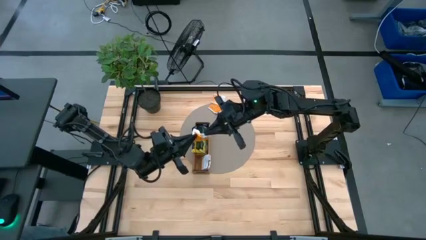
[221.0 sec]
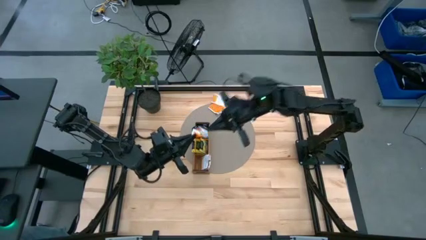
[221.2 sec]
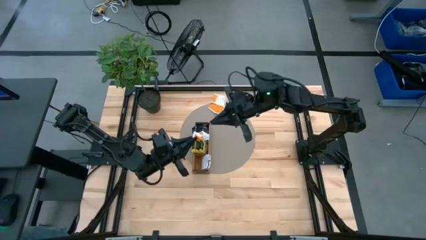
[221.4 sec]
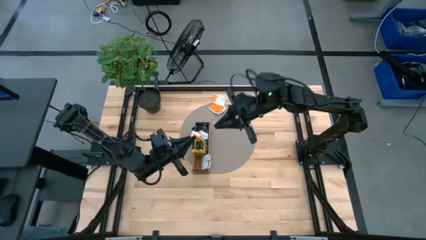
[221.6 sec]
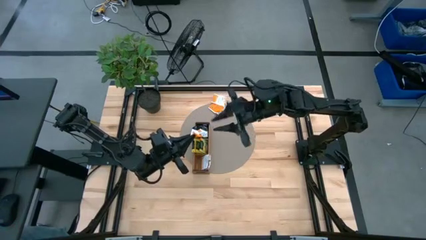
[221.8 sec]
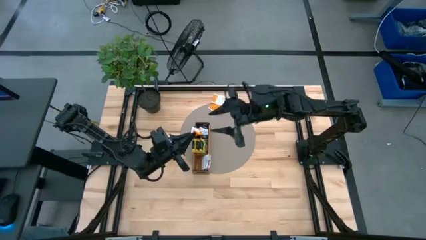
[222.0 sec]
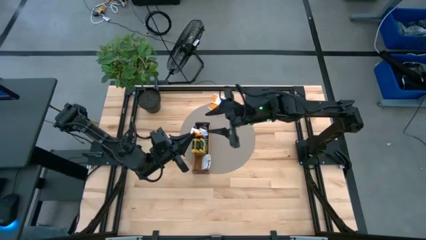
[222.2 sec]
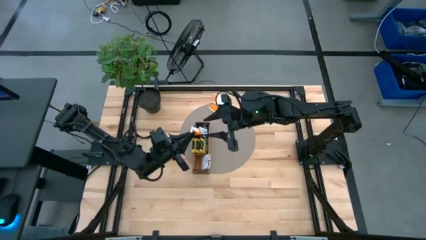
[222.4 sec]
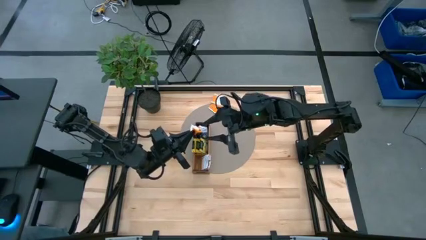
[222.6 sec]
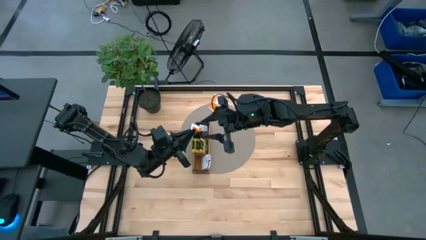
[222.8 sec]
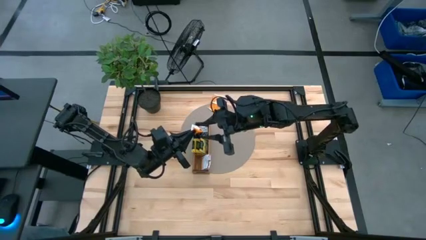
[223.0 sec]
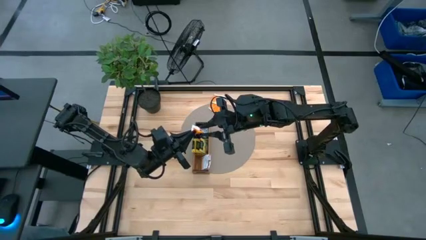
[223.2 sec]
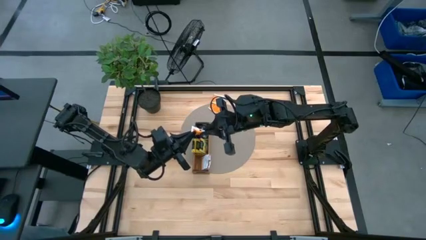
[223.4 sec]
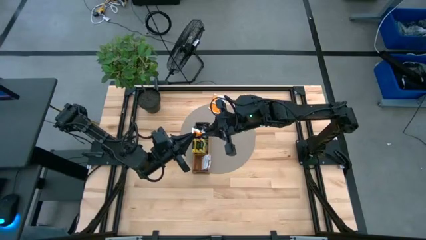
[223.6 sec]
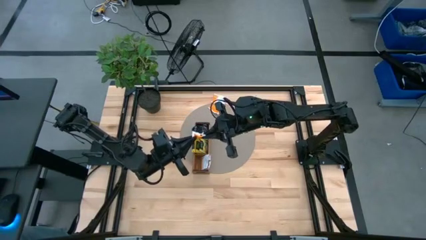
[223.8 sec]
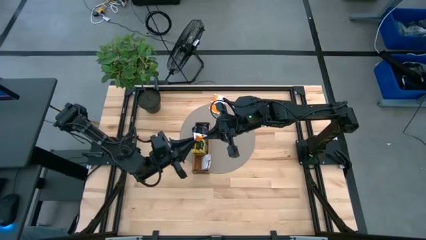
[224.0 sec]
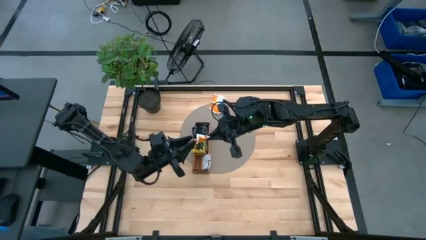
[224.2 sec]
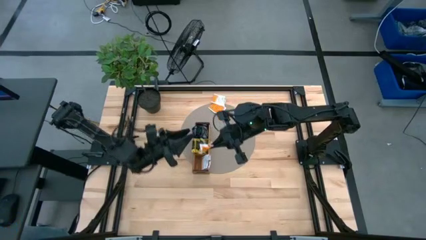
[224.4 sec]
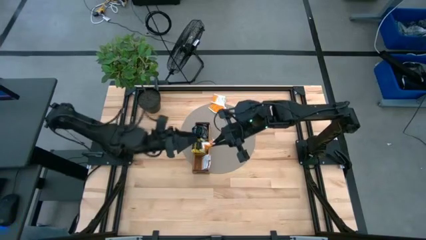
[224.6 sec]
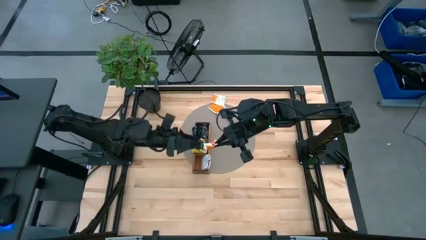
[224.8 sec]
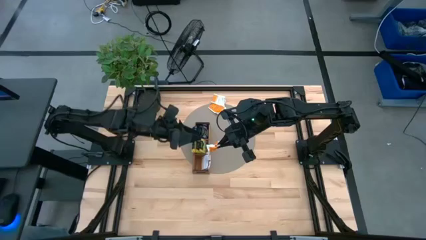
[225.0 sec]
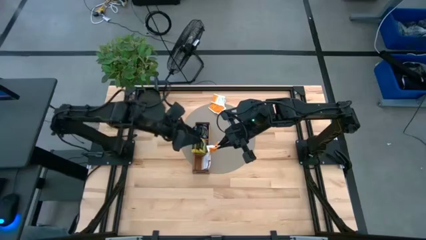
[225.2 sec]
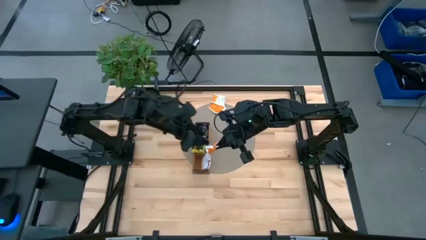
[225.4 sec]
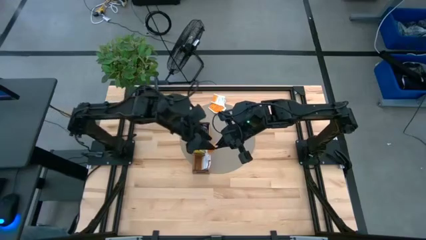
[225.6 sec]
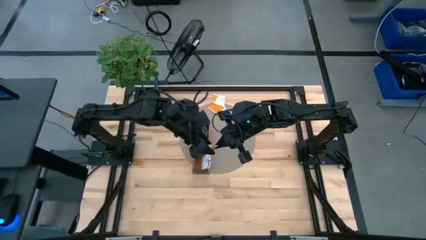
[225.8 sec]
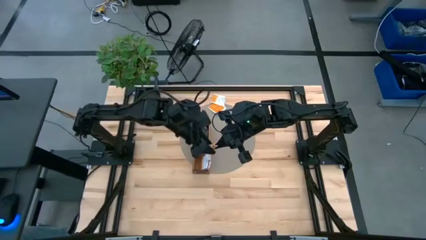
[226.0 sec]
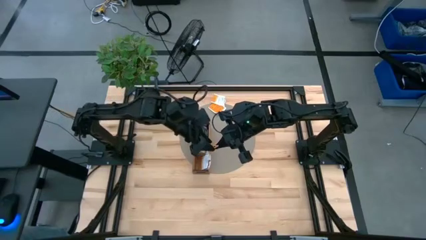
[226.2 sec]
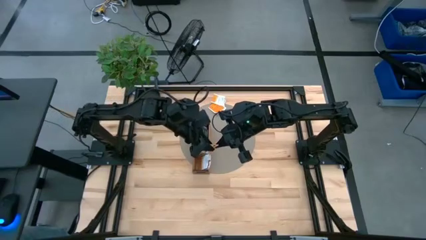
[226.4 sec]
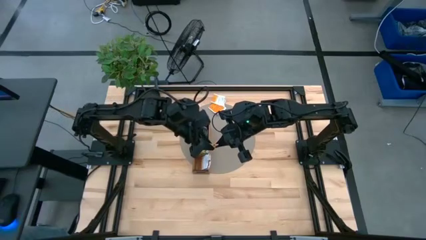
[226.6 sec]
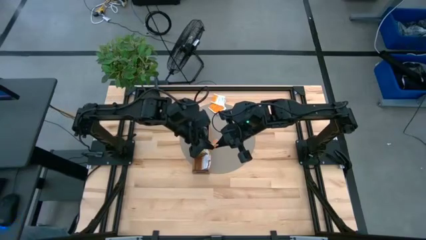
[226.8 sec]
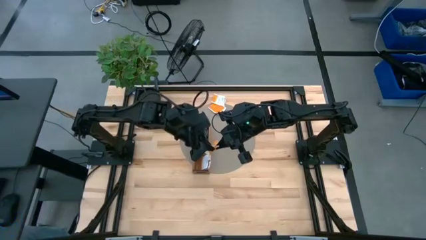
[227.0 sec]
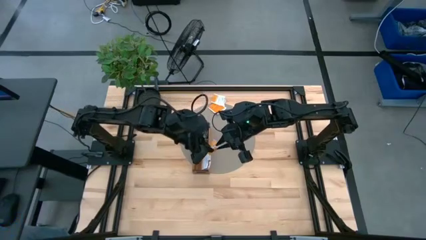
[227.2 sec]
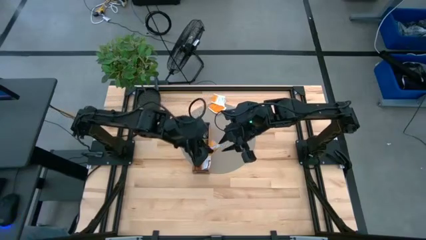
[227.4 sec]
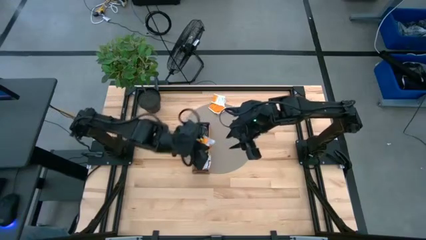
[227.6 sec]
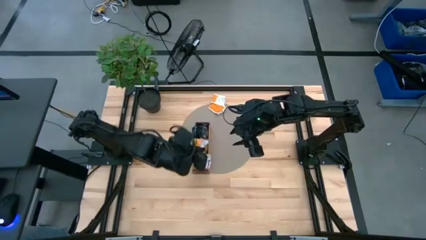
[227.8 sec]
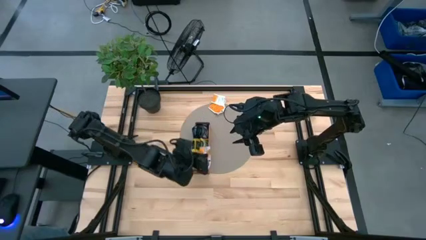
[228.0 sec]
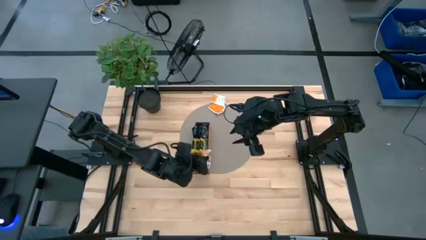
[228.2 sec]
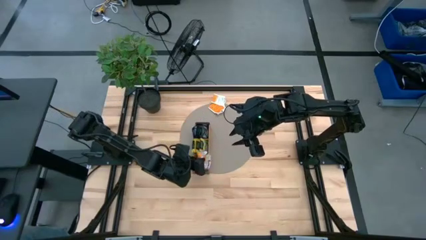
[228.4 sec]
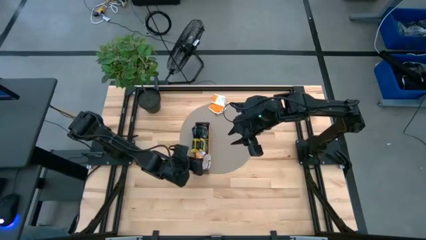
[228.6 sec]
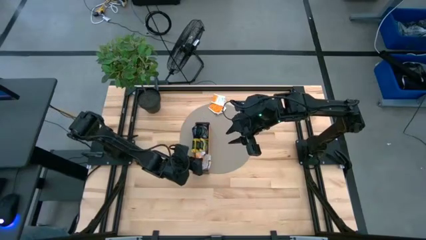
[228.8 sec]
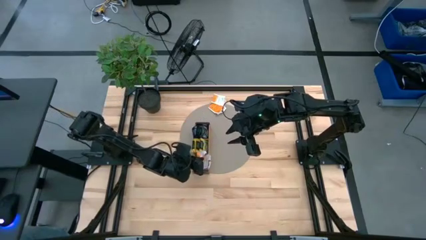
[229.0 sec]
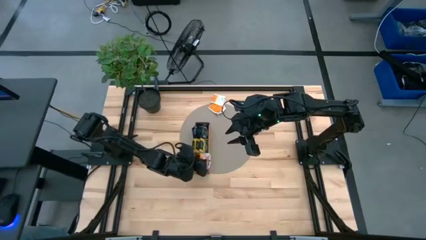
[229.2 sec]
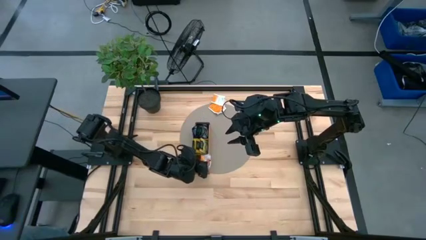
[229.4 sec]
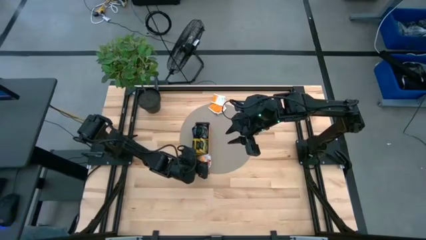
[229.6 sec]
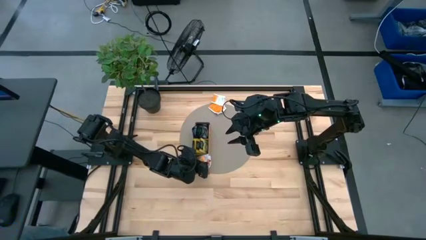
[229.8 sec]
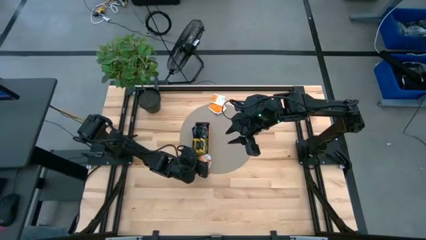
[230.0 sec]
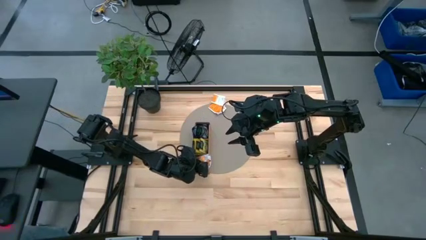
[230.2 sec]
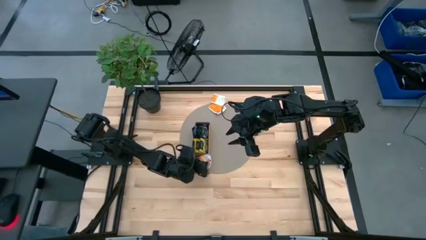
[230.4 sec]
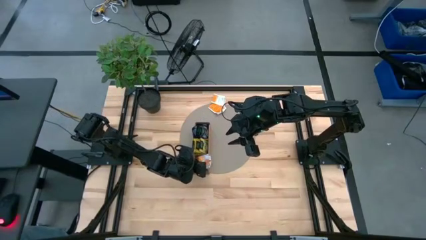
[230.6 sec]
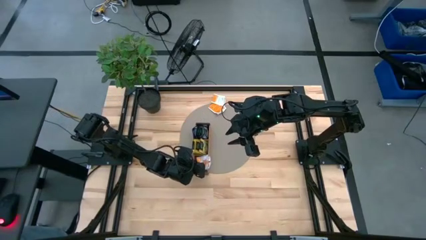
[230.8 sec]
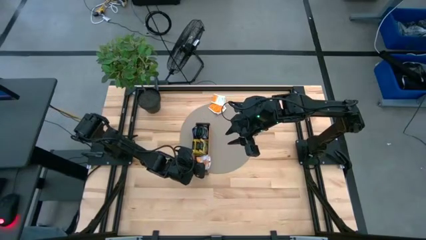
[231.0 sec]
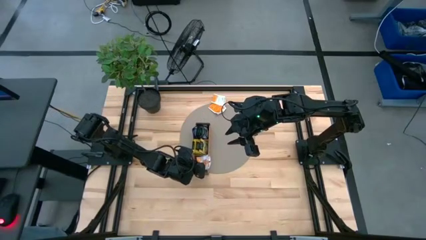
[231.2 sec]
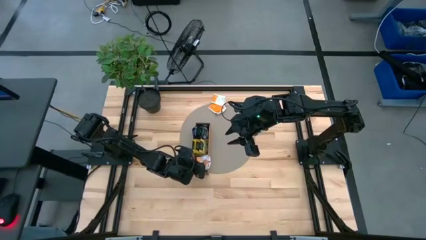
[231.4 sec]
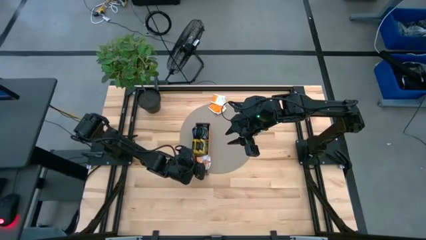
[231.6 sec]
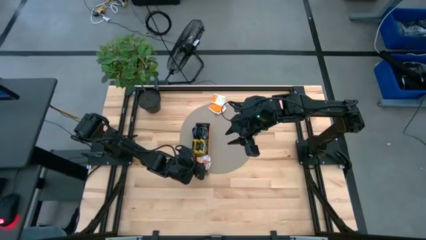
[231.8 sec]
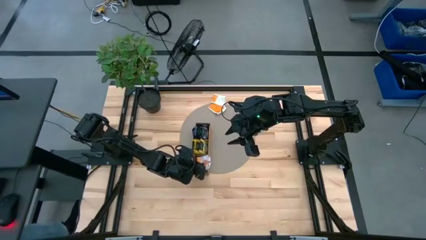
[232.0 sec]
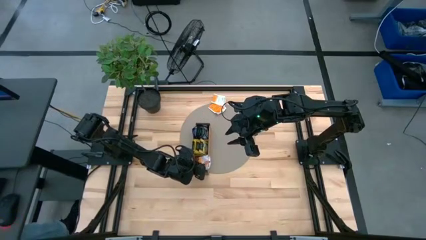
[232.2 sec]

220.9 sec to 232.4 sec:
Task: Pick & Place Tea
Put the white tea bag into the bottom section of the wooden organizer
